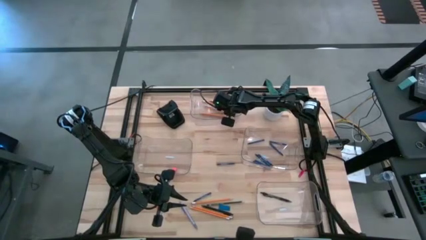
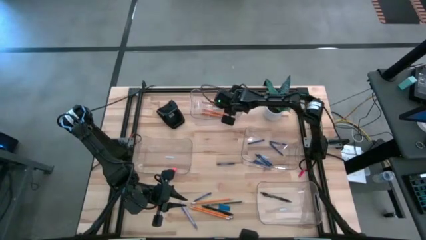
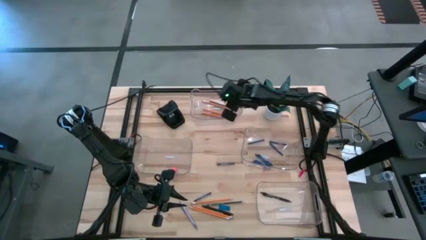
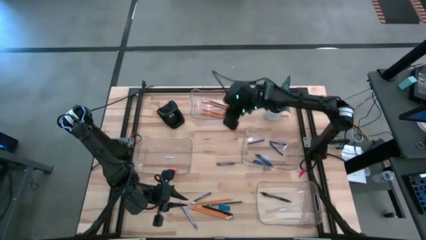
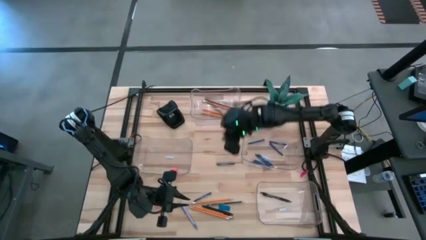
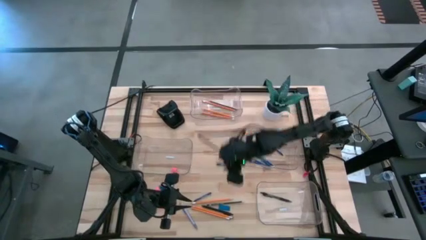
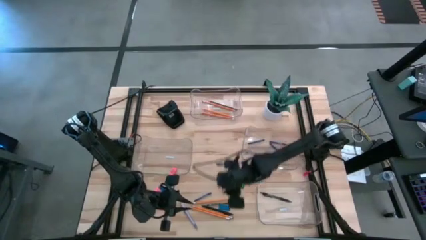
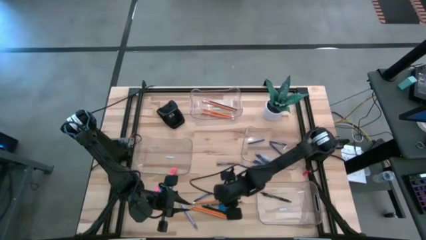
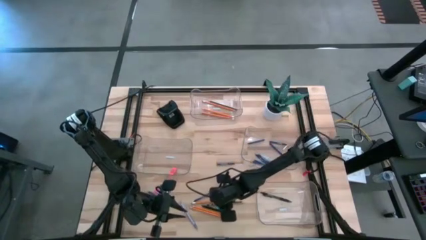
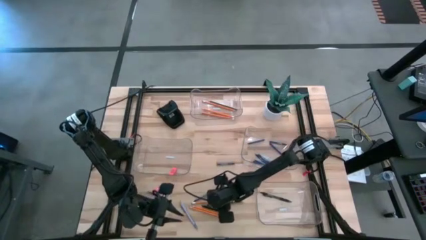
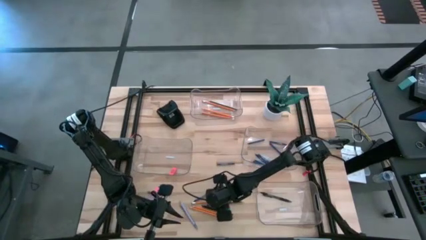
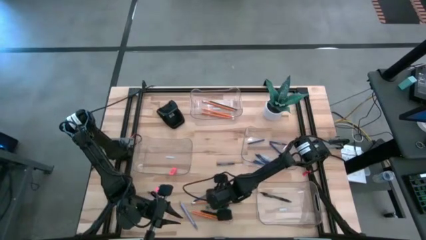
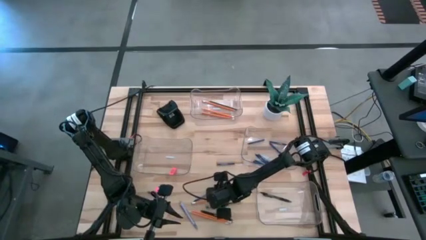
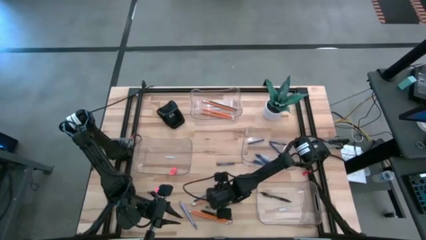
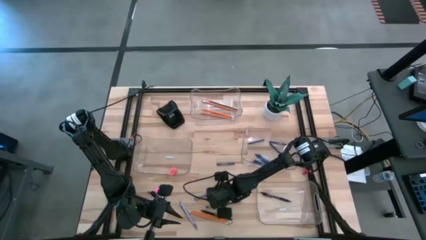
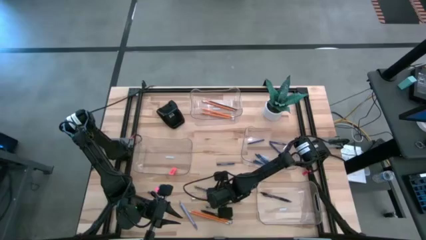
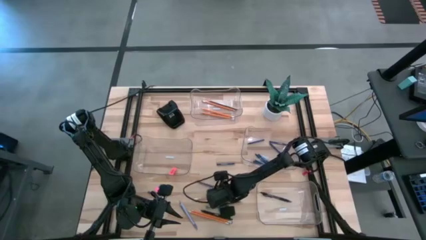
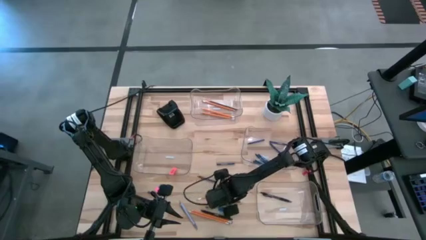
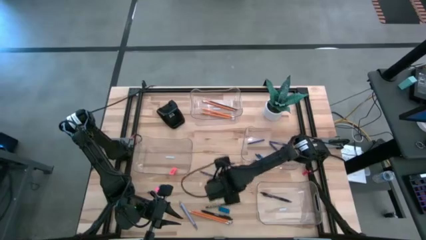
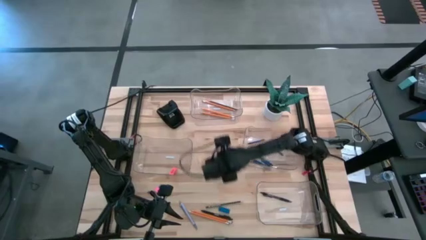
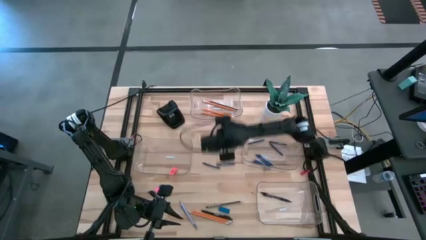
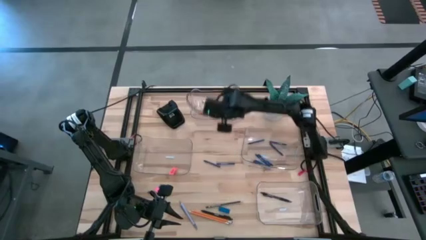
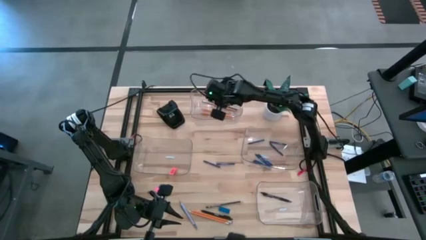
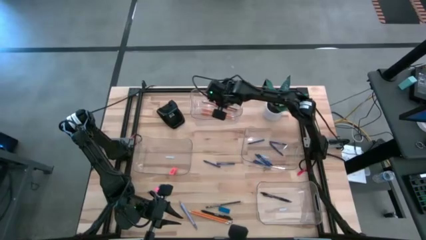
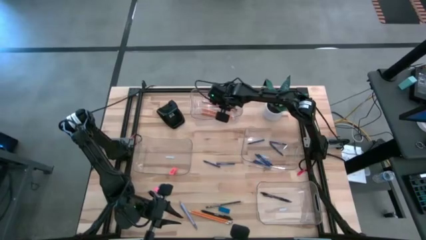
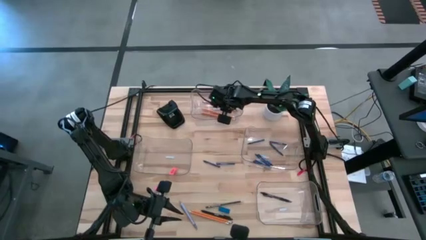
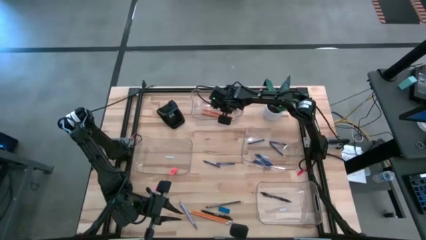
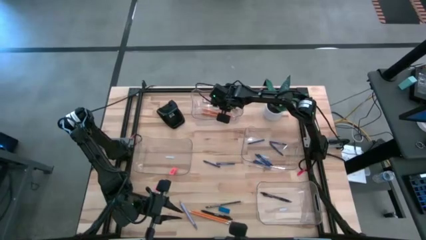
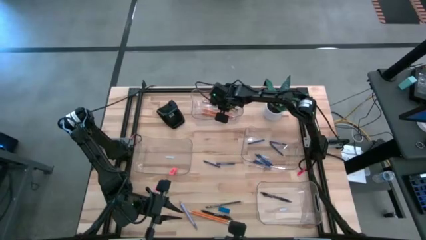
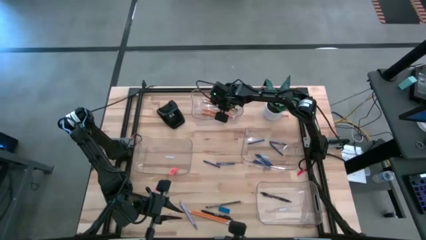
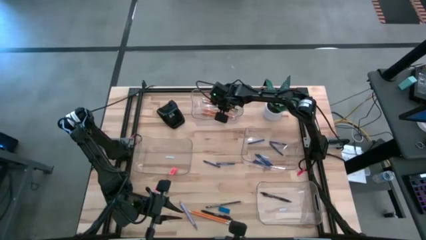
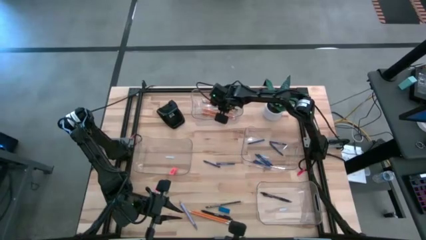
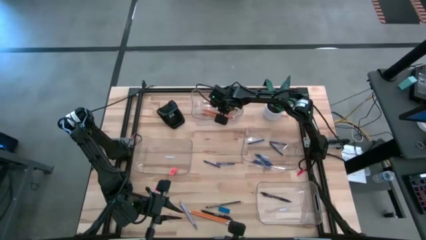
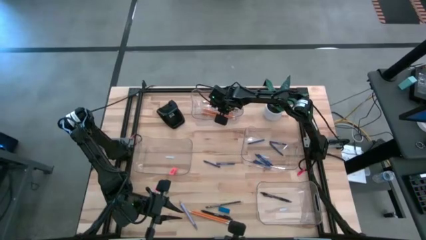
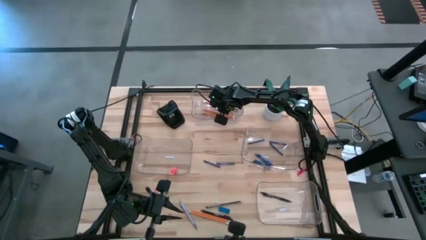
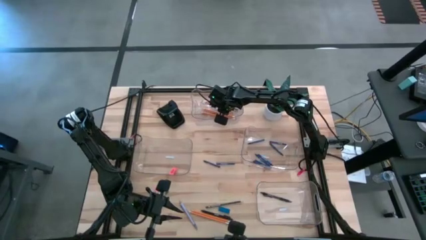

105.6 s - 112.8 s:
Task: Sort crayons/erasers/pens/pencils in bins
Put the yellow pencil into the top transparent bin

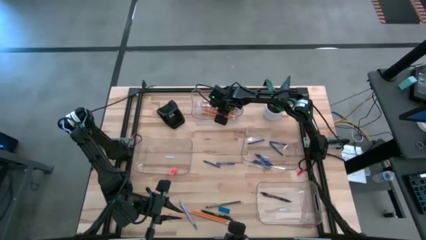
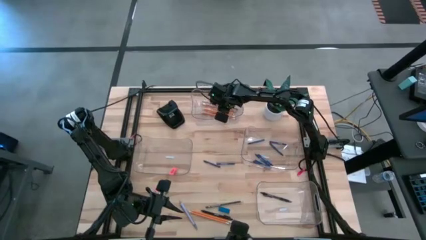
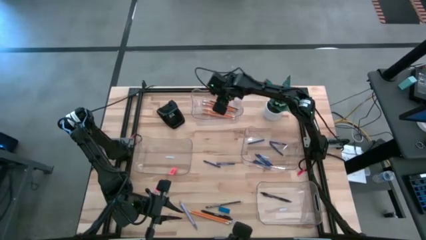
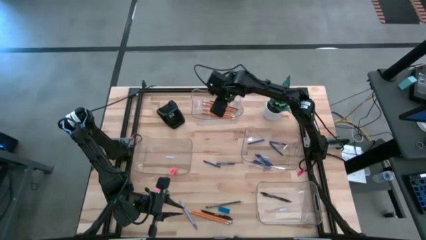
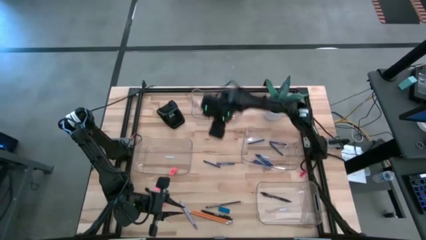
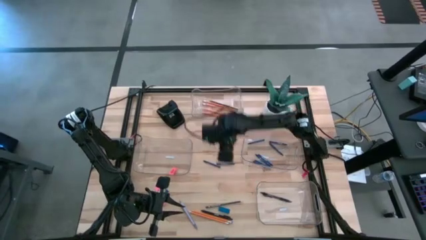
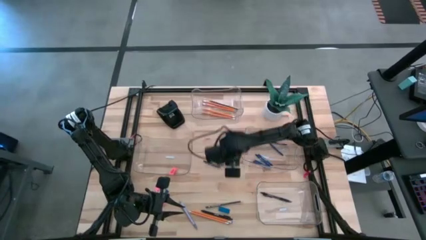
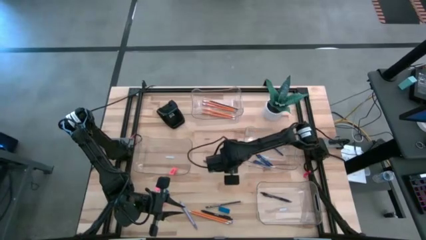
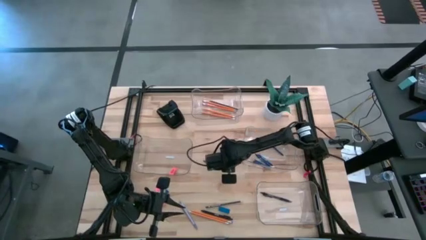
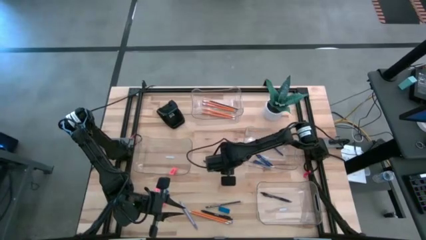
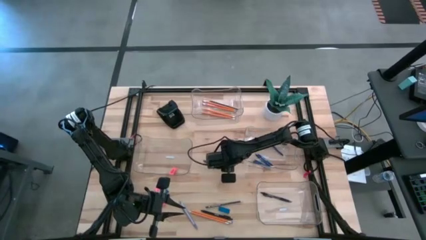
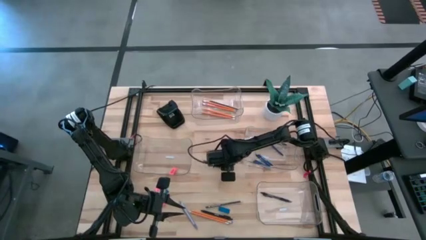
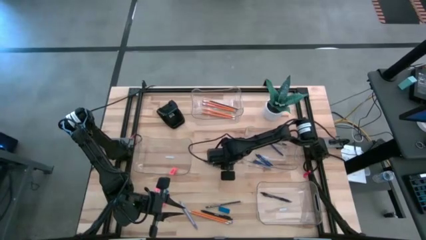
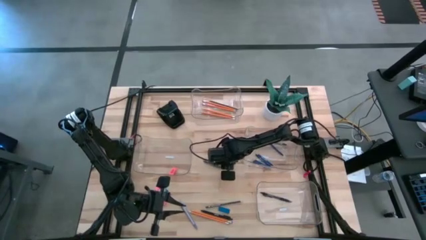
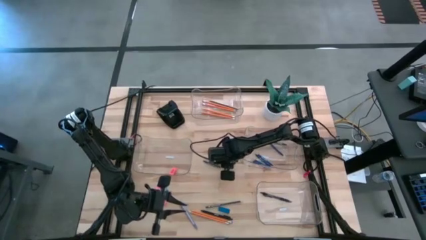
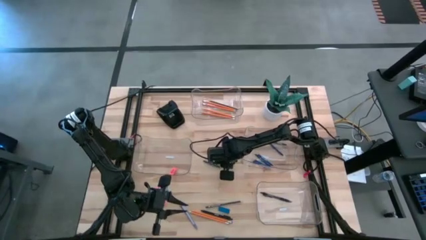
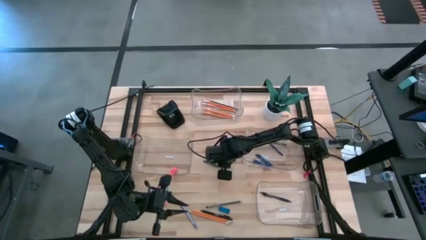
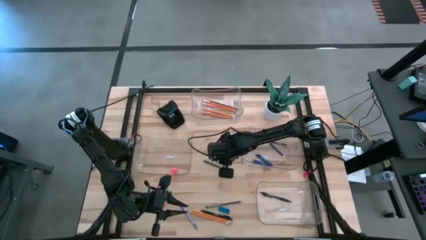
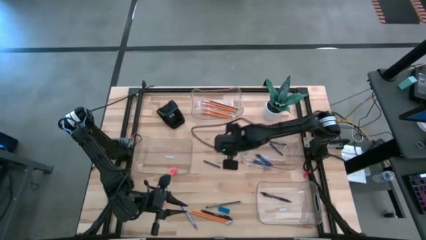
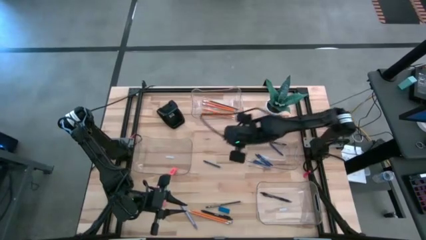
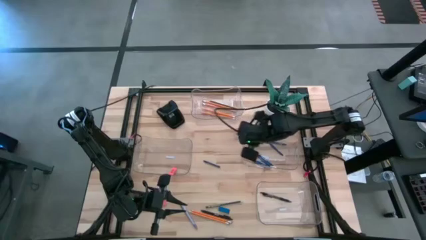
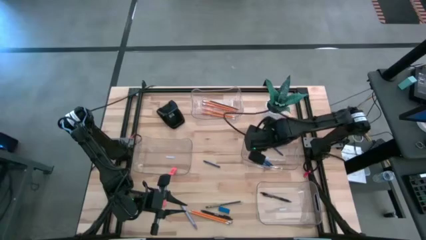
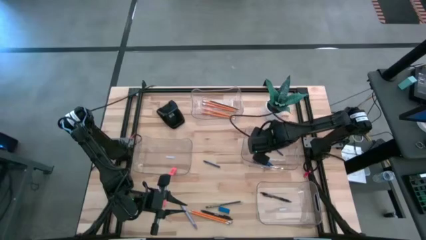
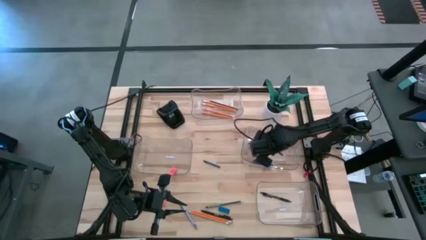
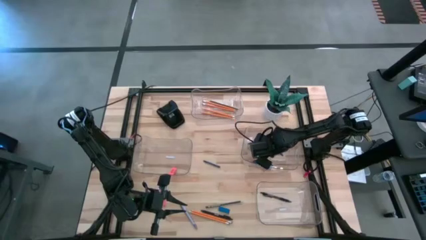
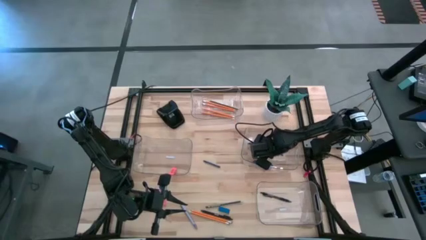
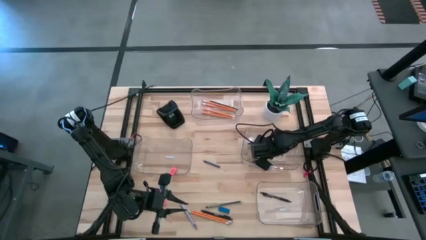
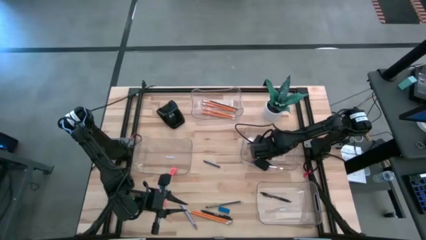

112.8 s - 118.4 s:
Put the blue crayon into the middle right transparent bin

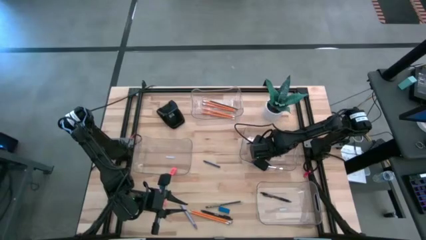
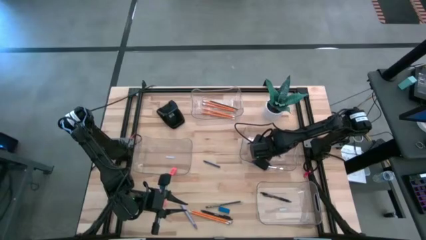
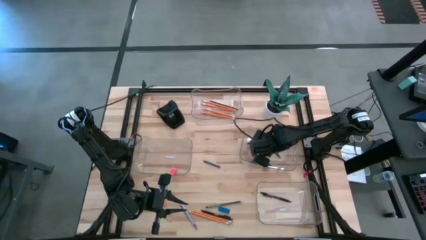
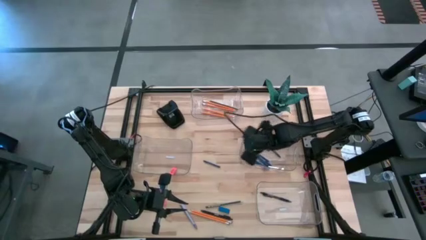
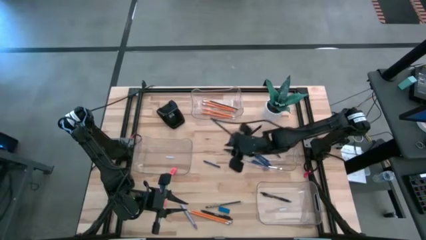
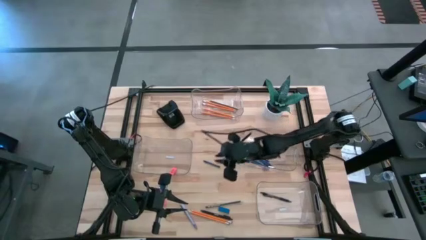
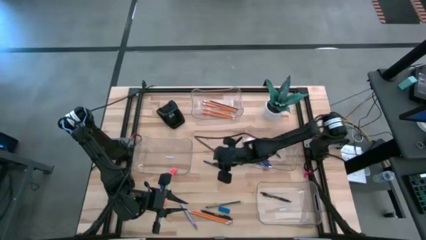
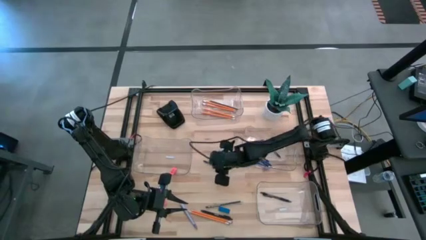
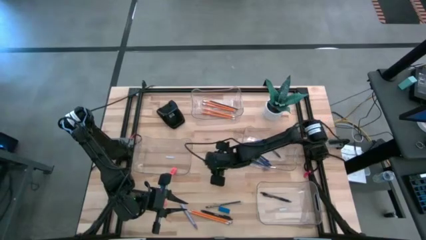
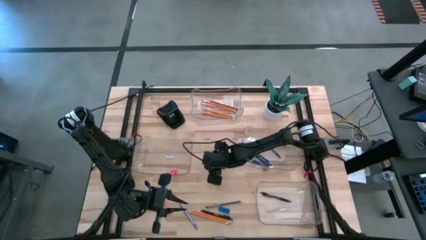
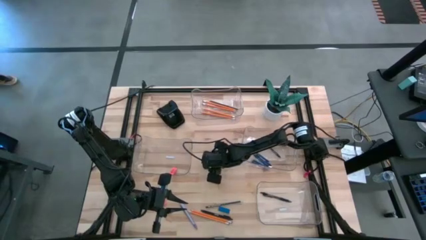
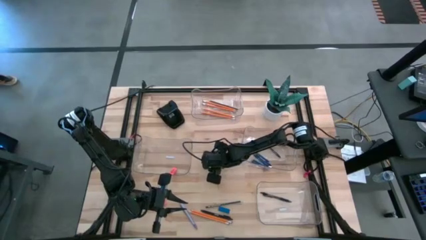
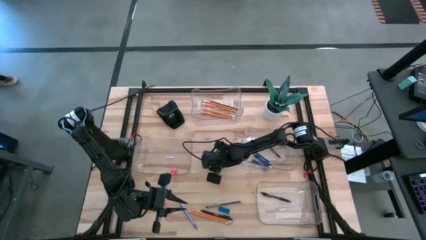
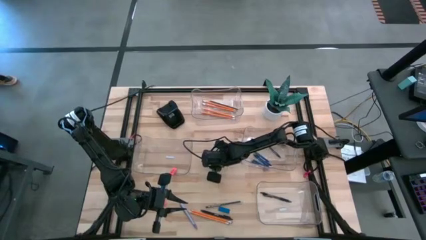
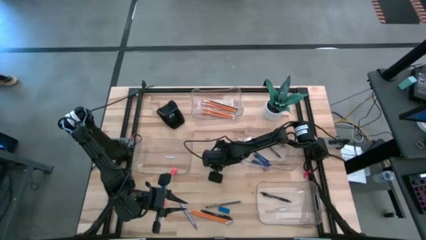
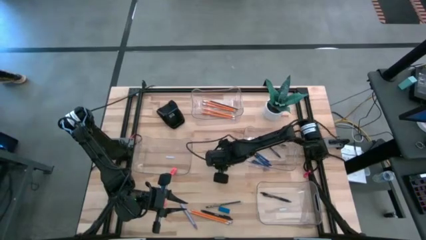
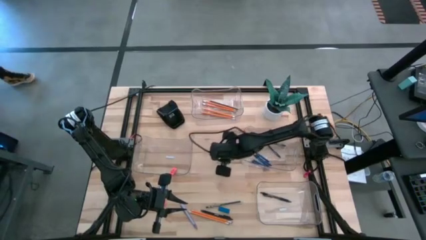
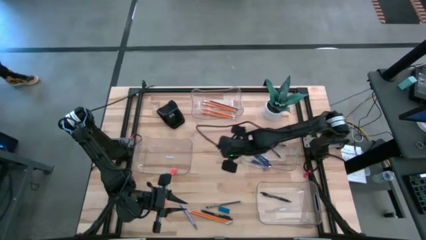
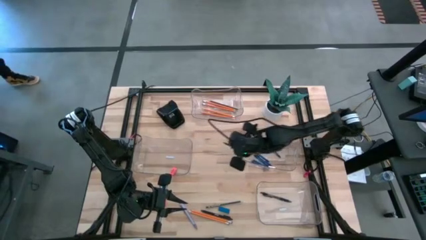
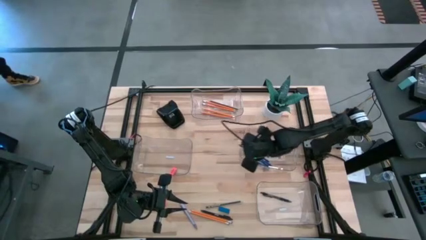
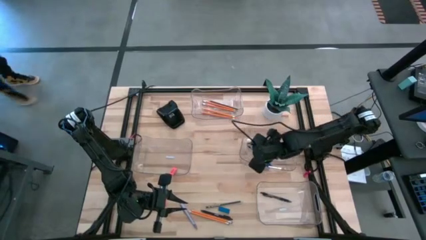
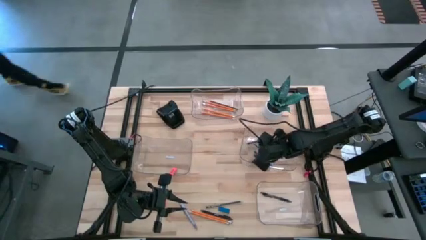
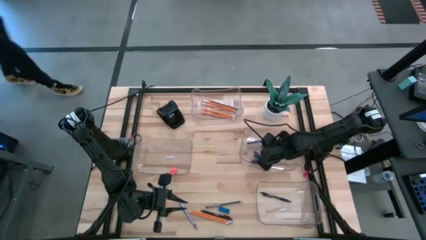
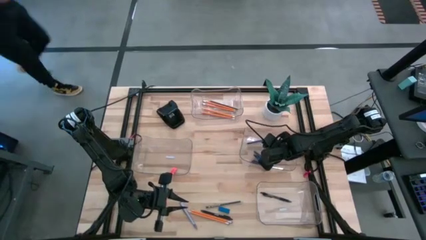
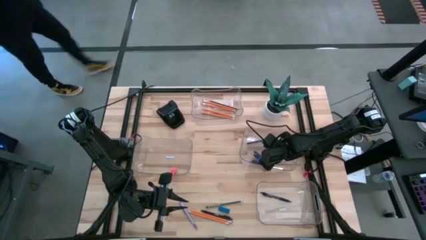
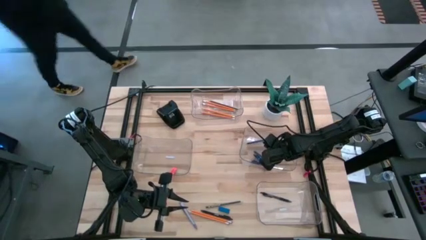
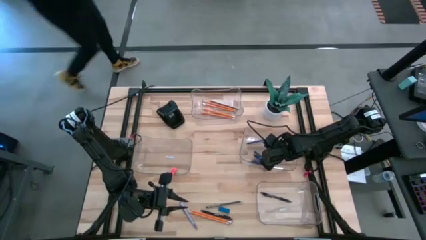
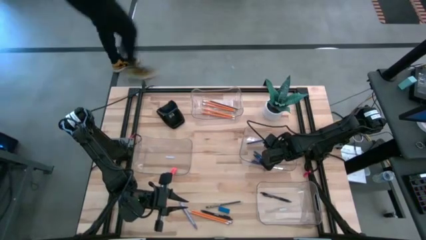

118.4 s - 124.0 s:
Put the blue crayon into the middle right transparent bin
